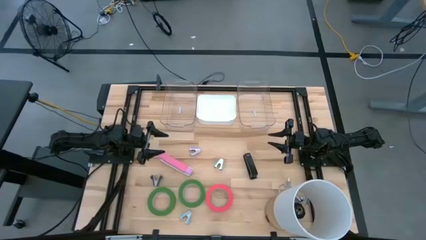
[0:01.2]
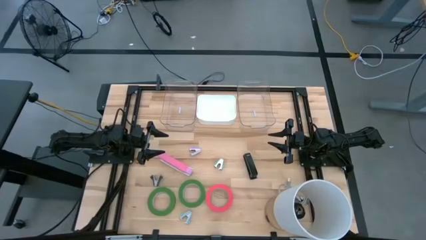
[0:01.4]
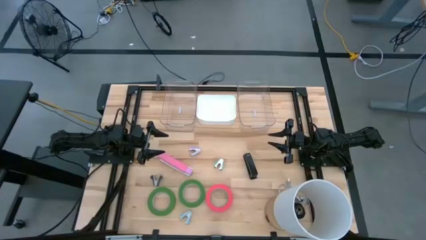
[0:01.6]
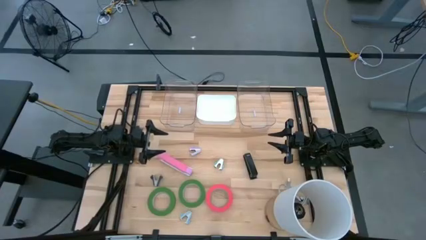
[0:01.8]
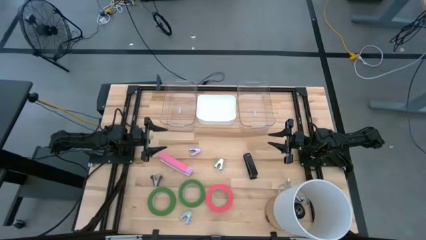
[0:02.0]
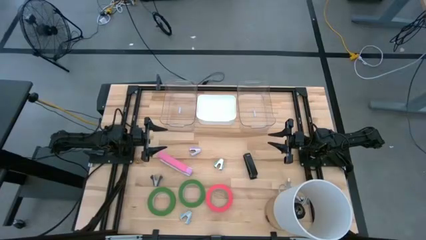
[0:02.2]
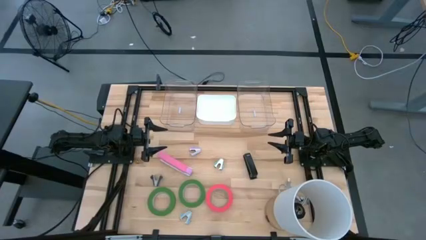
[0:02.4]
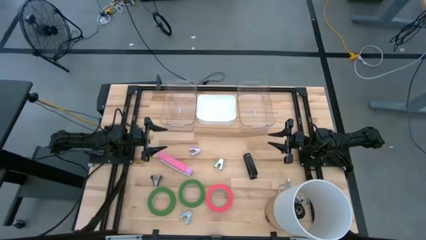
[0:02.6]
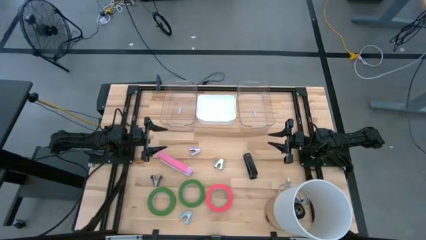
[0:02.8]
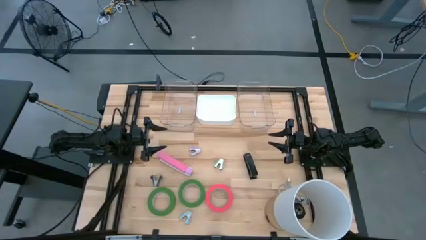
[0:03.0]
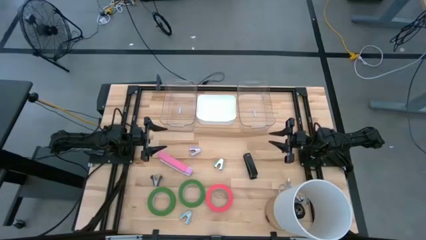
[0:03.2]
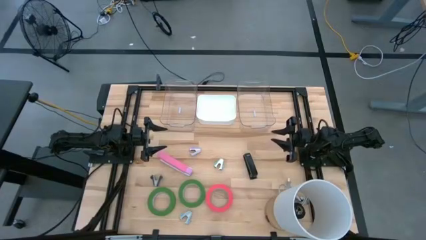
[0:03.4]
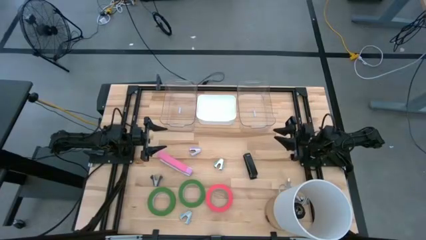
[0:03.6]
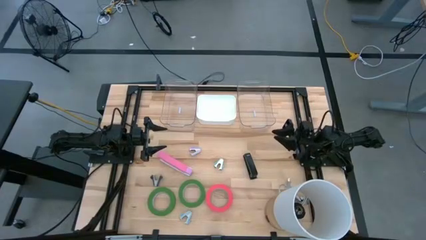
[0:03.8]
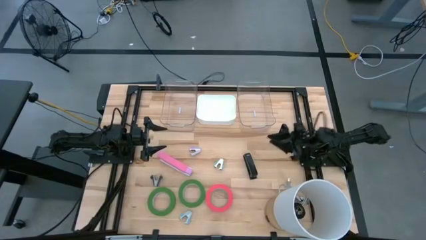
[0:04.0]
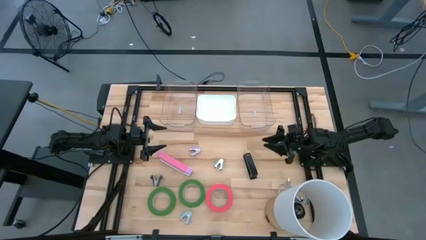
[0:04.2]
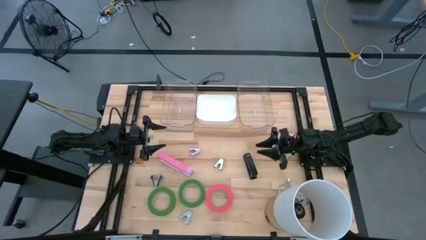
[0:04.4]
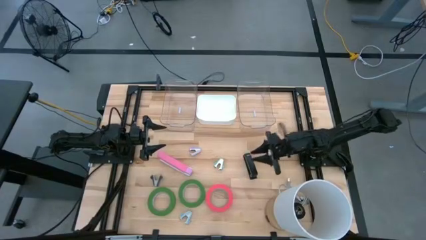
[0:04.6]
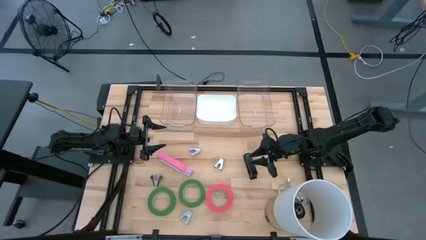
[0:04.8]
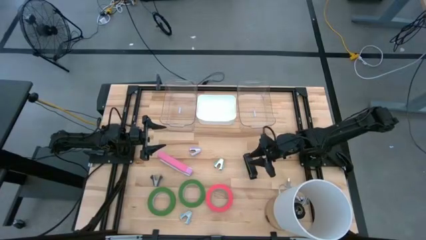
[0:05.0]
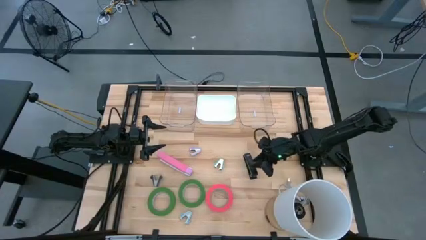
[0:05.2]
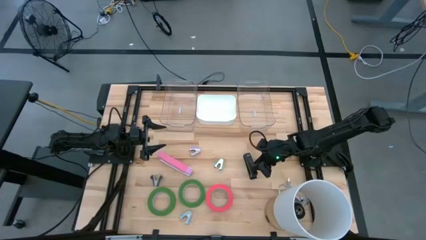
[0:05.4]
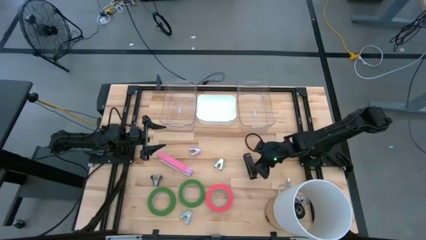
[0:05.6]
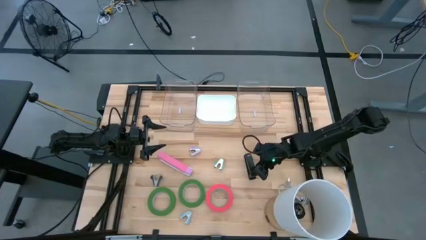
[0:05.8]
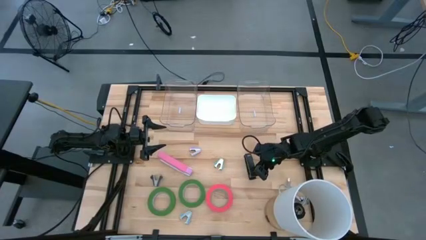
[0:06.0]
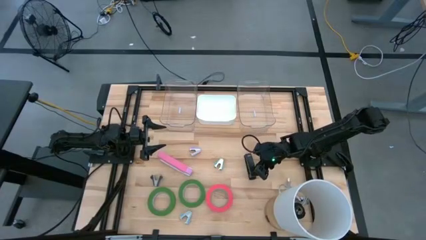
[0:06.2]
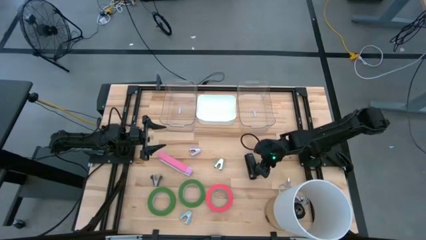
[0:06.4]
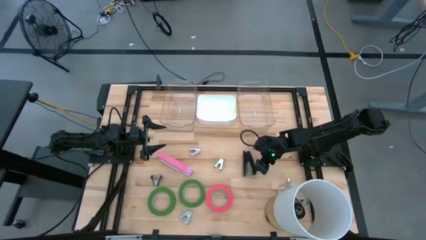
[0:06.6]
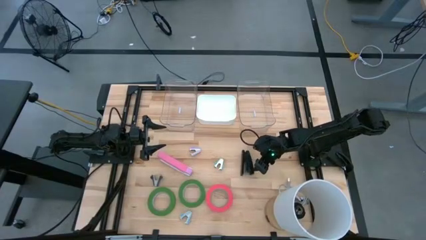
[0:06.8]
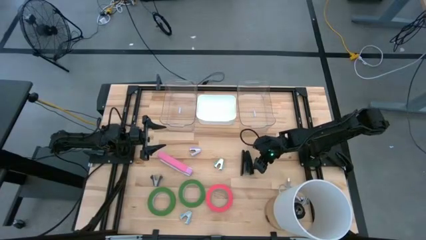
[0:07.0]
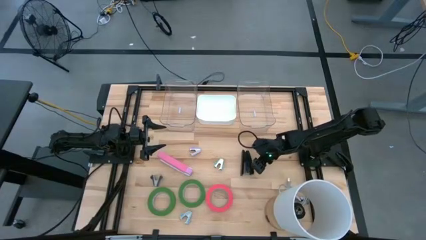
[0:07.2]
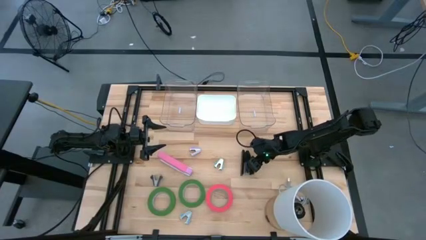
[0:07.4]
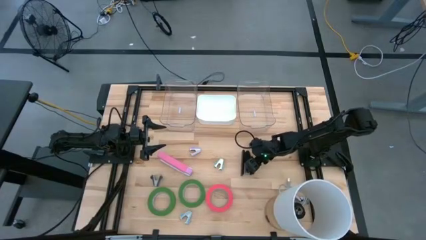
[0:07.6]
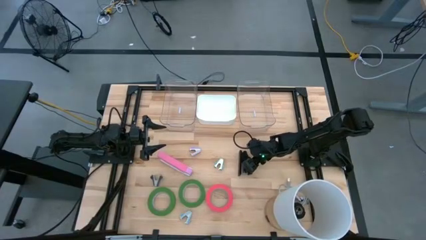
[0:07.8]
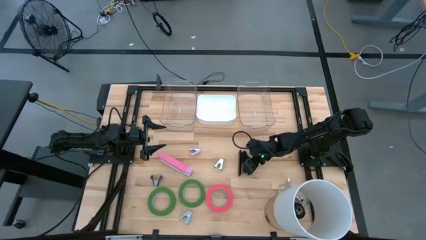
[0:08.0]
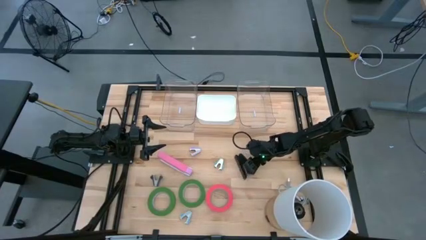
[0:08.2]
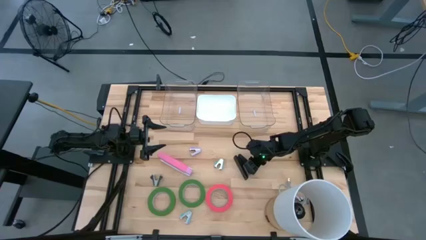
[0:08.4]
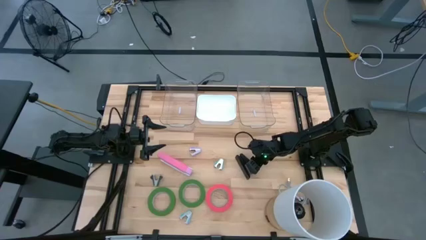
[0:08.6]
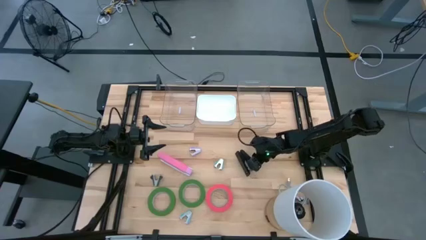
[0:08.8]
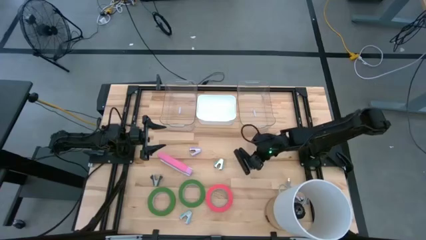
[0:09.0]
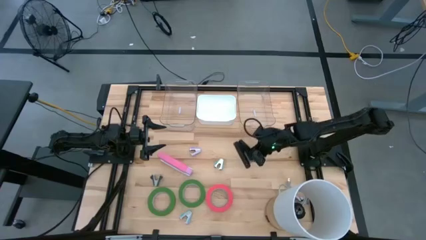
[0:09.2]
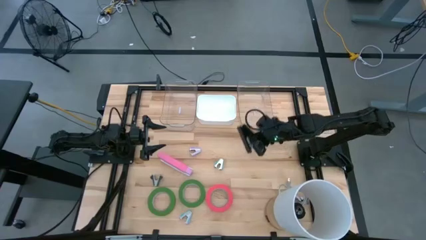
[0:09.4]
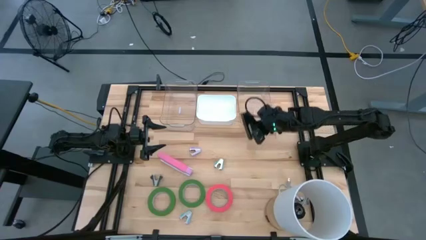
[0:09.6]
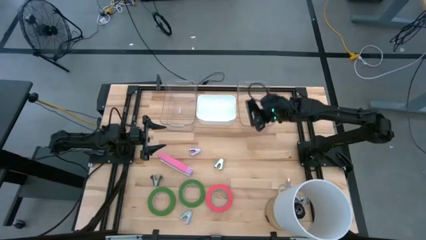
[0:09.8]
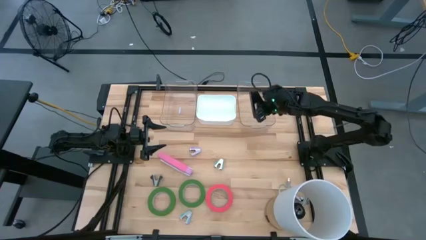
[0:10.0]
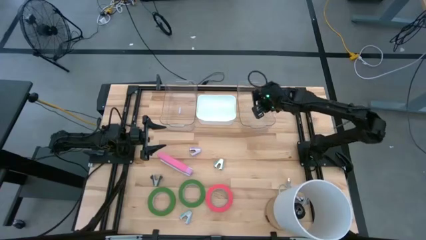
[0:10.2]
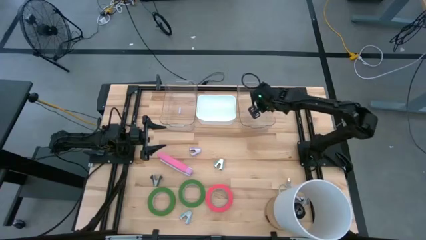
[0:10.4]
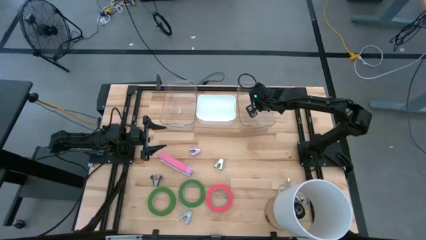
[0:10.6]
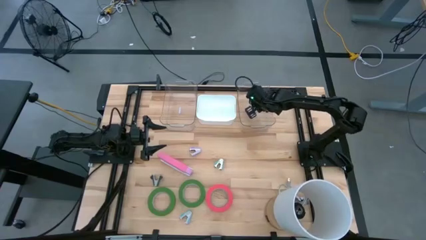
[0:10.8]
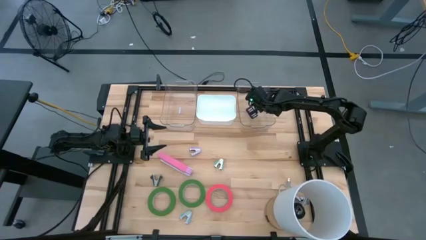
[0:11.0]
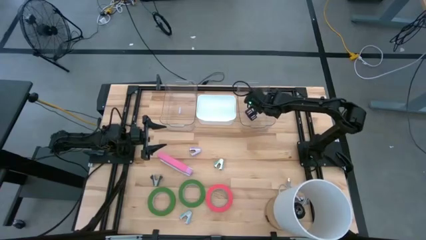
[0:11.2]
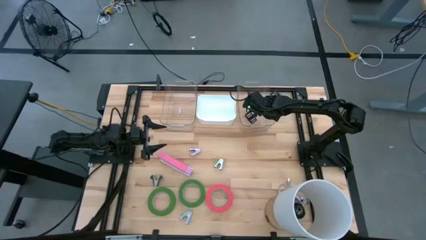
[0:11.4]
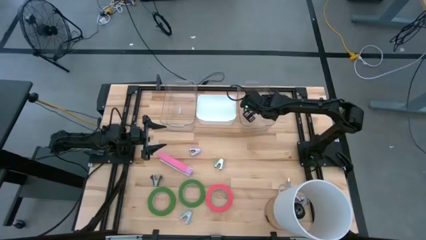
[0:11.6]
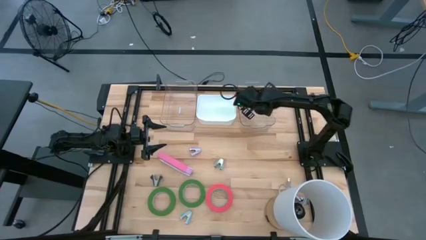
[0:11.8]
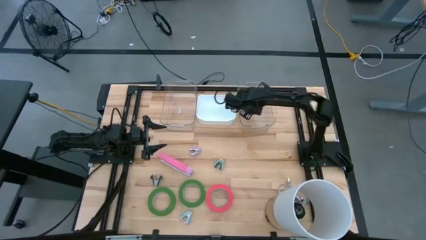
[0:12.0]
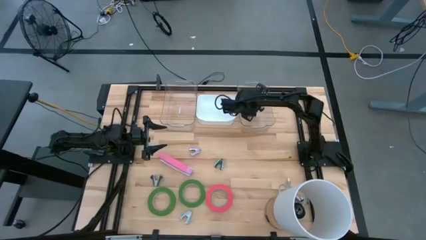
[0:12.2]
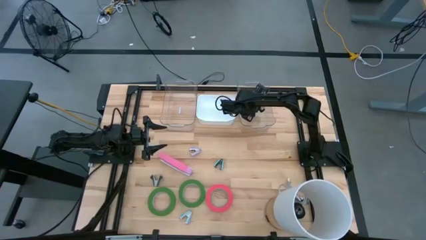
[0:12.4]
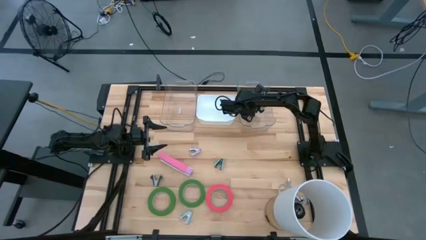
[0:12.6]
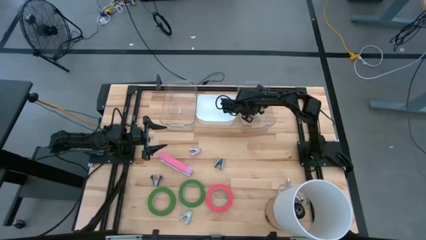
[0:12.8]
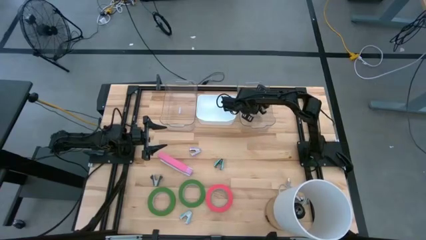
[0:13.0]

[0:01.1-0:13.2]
Task: Pick and place Stapler, Stapler remover, tape
Put the black stapler into the right transparent bin

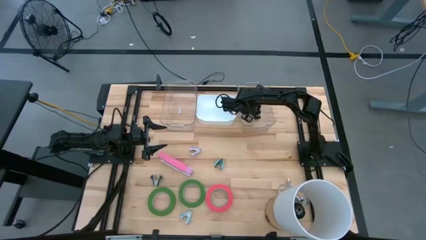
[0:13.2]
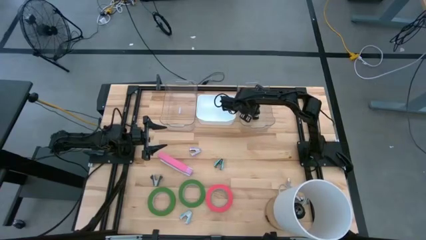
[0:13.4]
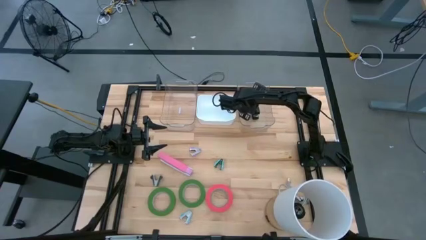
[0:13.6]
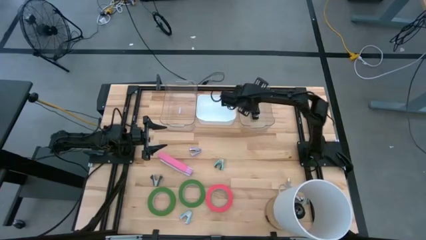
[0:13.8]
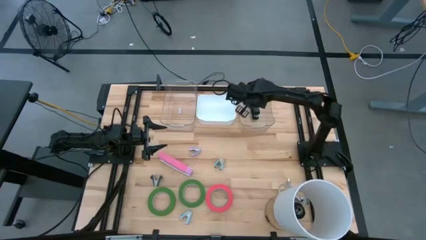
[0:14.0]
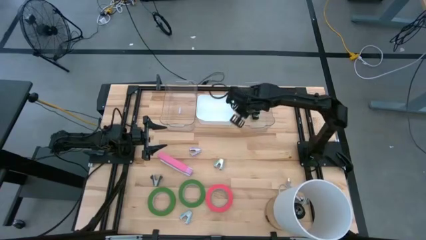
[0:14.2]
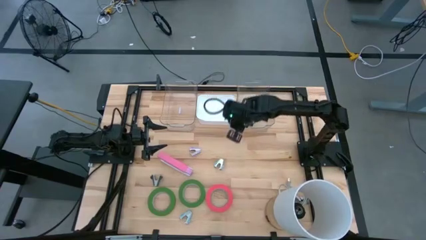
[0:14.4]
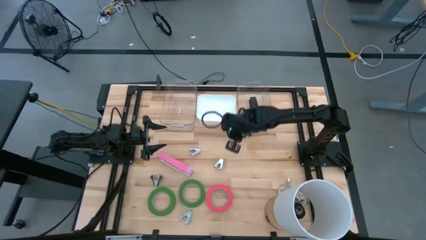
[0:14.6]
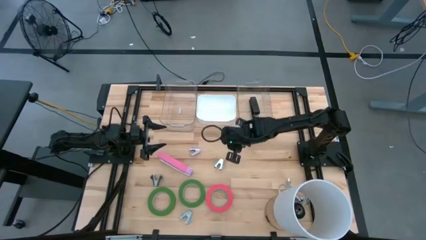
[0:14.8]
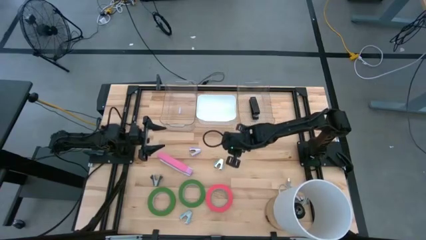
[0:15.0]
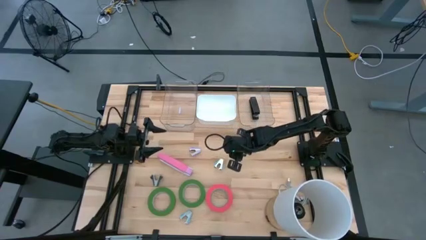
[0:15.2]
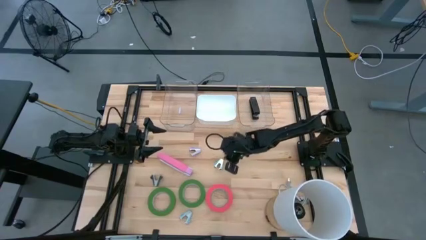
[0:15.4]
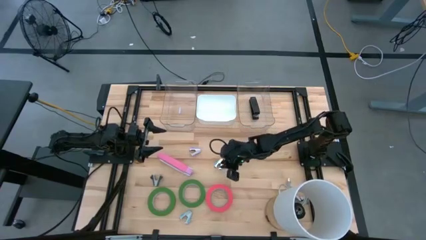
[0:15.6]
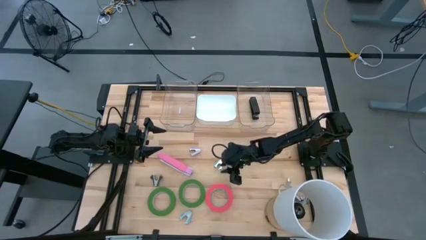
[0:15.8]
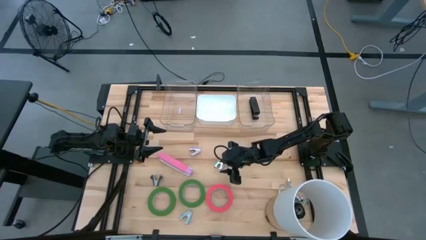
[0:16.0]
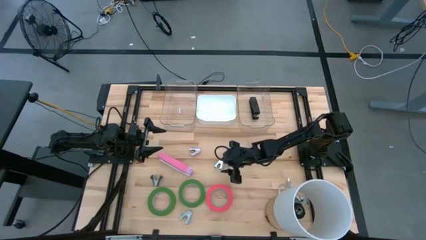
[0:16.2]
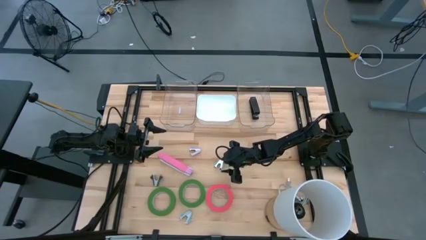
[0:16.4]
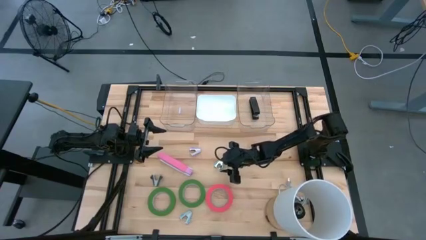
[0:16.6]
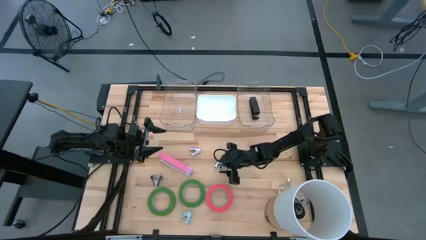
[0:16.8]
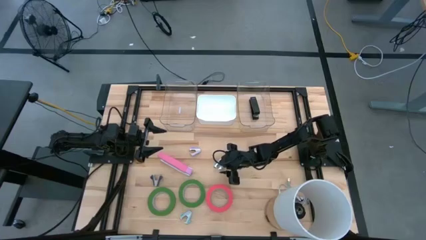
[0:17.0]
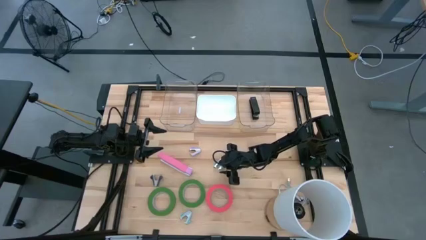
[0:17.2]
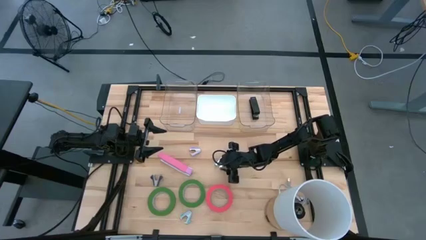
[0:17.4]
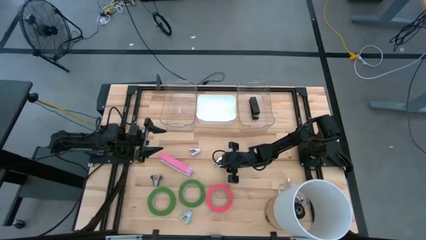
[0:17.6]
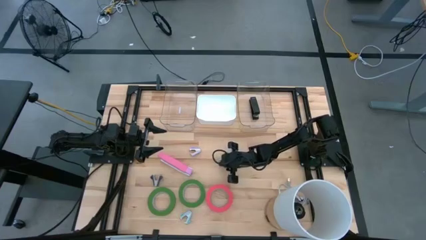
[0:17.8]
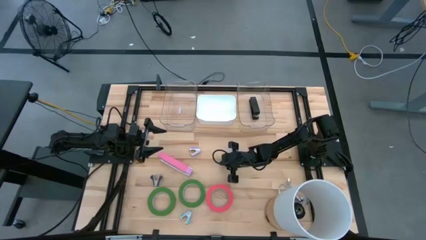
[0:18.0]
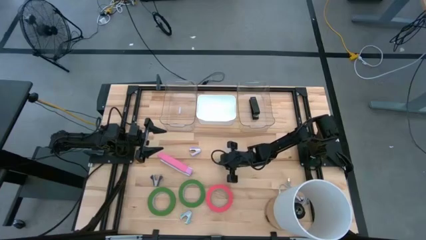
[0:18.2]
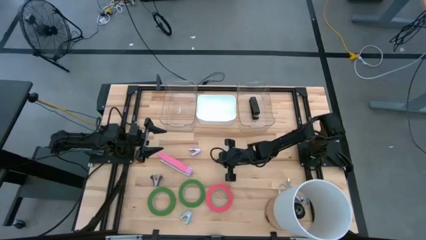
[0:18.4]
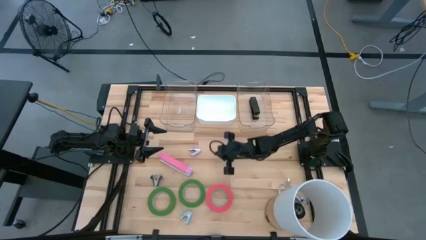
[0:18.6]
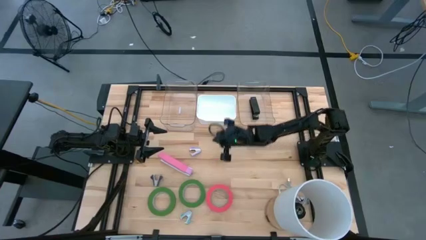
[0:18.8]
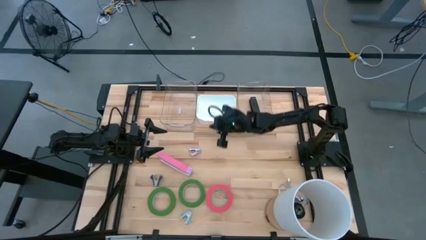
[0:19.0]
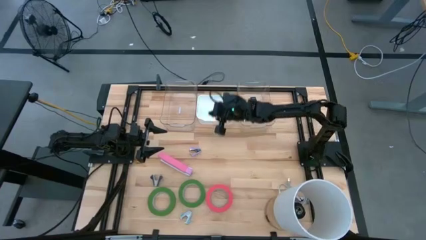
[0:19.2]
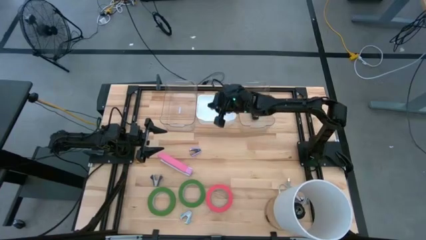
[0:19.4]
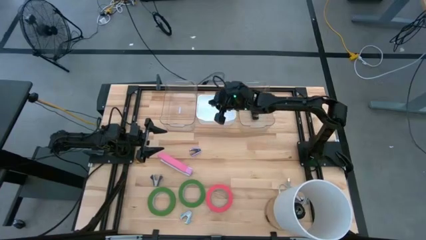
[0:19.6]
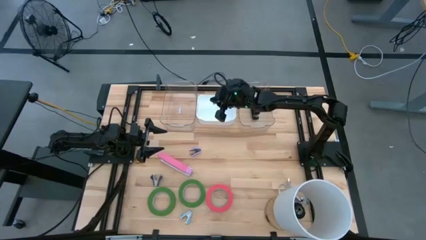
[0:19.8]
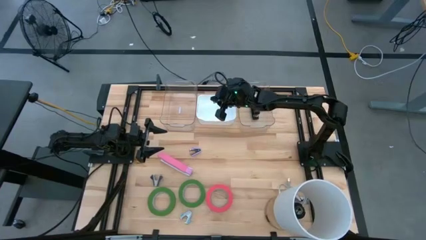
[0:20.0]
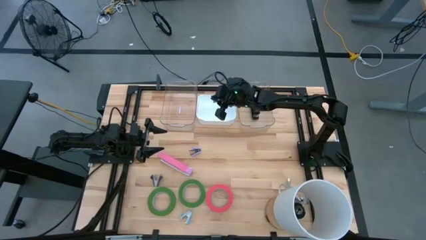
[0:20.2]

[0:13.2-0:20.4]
Put the top light blue staple remover into the white bin
